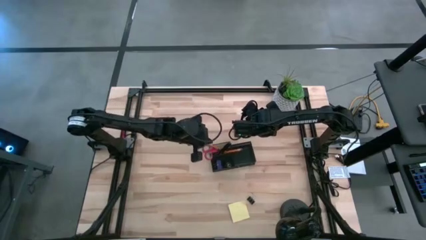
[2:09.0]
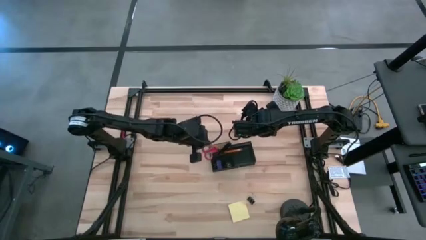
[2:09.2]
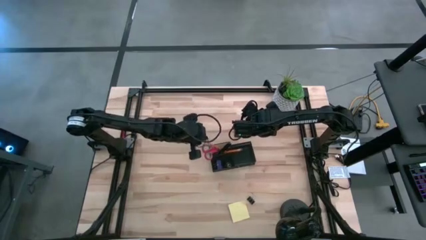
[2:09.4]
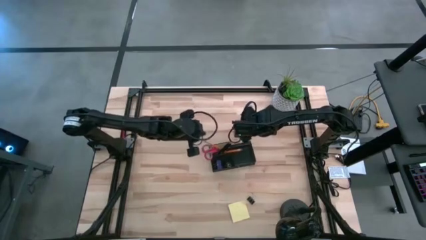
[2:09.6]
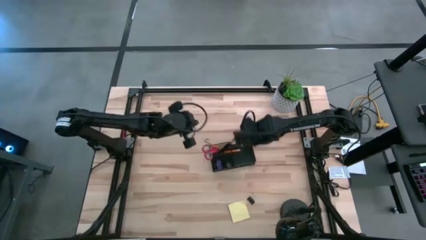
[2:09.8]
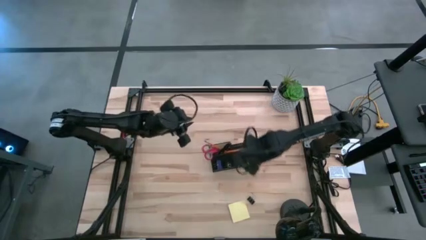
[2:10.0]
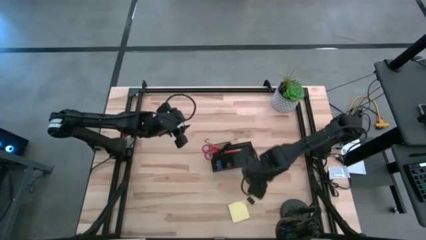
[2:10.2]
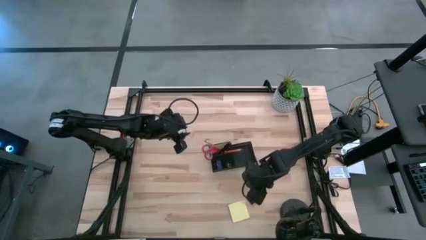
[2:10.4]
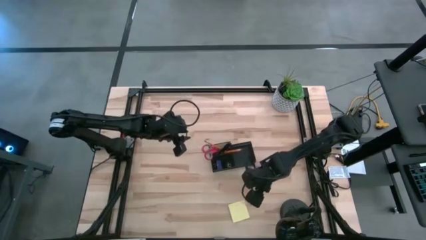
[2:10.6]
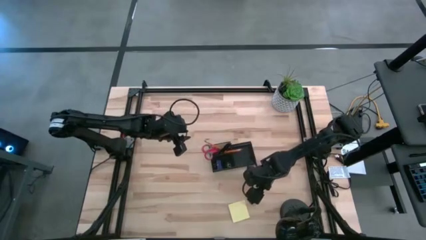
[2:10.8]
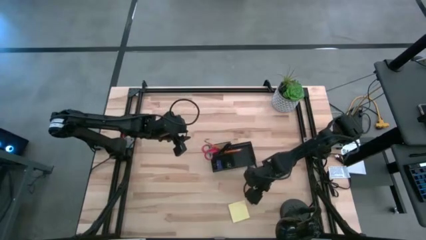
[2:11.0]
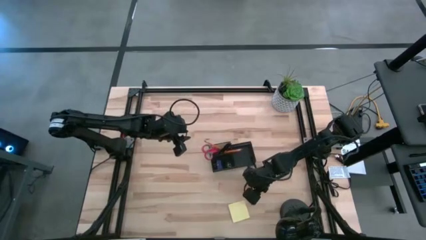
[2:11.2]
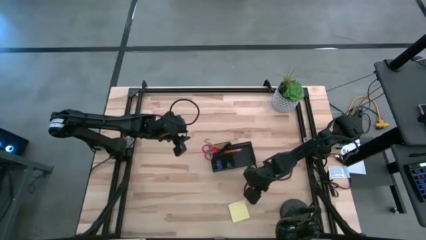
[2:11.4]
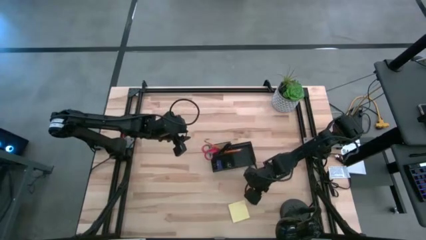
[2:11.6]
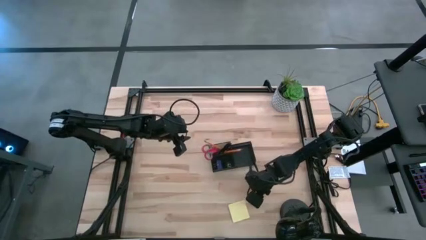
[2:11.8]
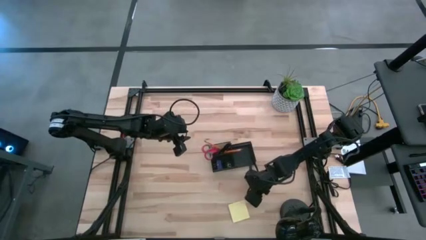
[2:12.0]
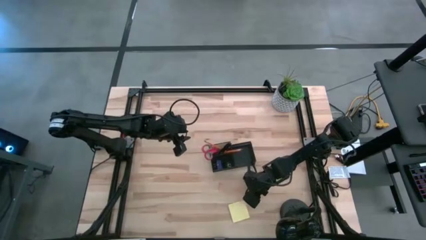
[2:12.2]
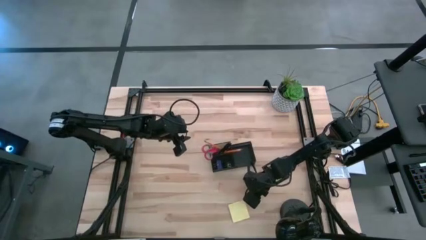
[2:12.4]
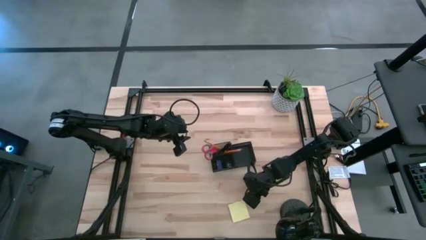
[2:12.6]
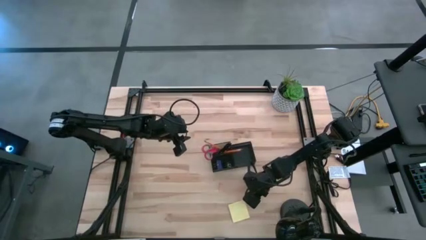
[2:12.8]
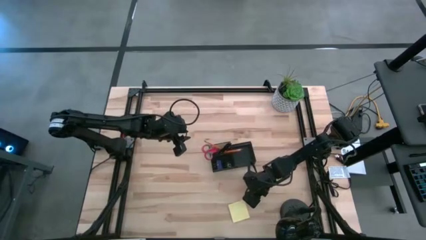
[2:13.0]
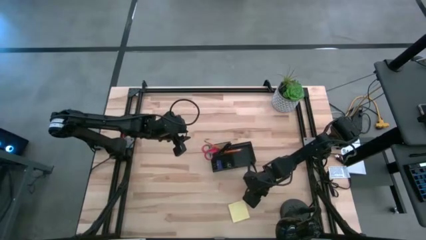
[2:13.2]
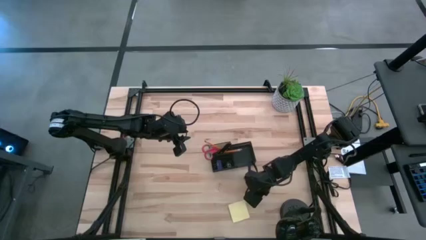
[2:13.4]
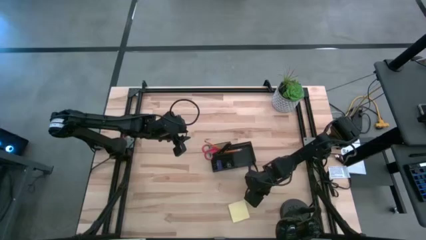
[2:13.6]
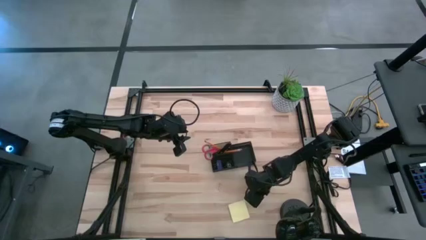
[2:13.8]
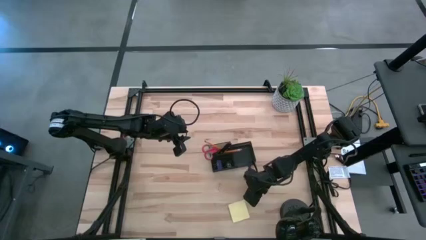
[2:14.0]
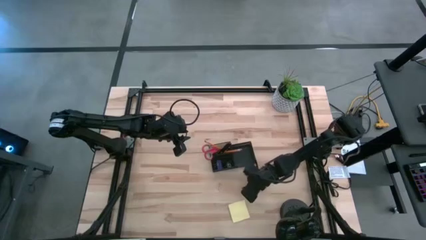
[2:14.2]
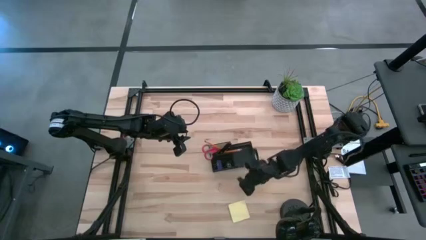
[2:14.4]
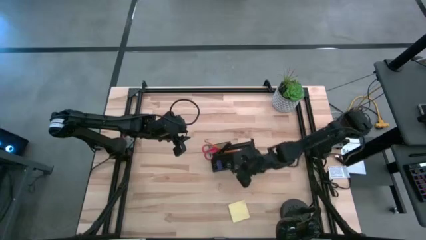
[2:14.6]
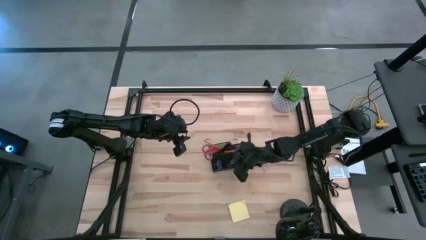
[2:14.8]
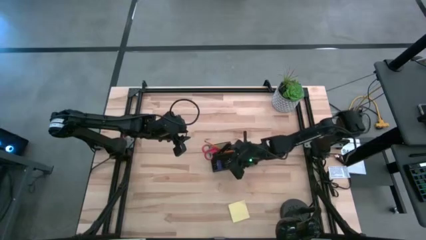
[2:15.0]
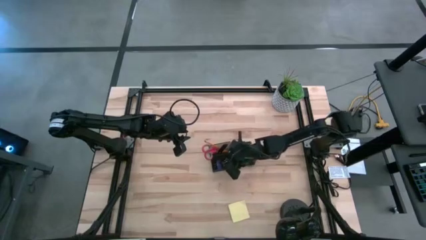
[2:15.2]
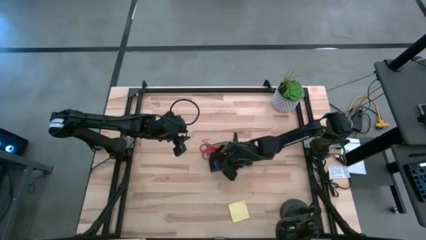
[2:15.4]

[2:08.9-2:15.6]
Task: Pick and place office supplies into organizer
Put the binder clip into the bottom left section of the desk organizer

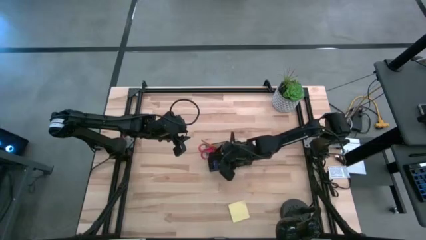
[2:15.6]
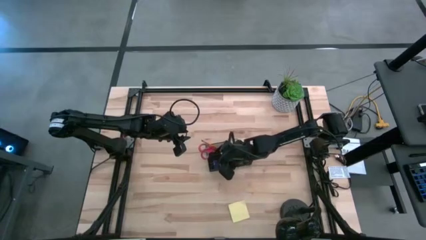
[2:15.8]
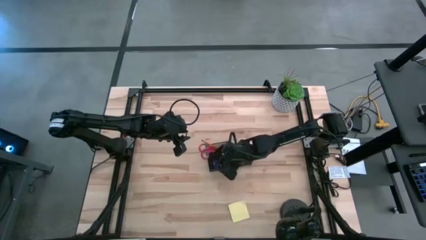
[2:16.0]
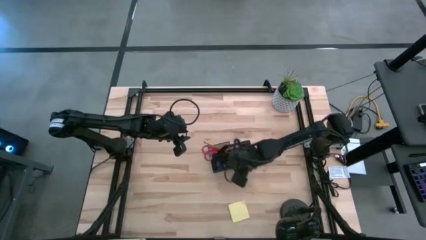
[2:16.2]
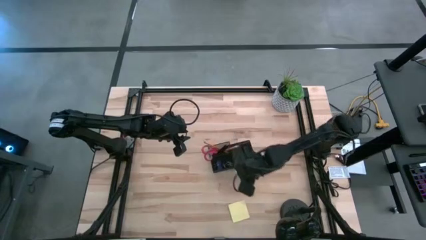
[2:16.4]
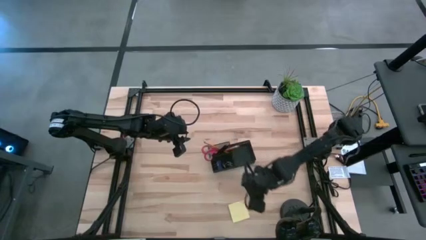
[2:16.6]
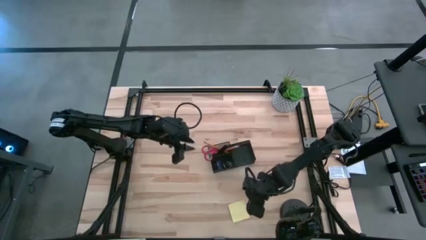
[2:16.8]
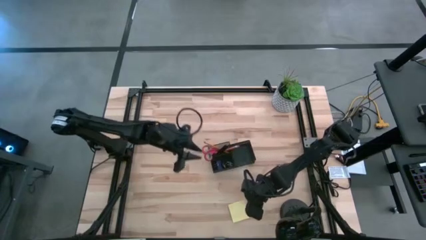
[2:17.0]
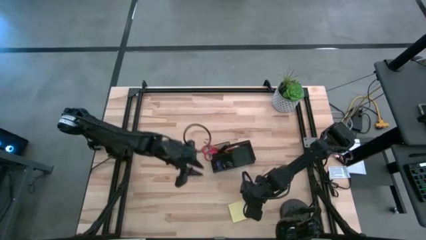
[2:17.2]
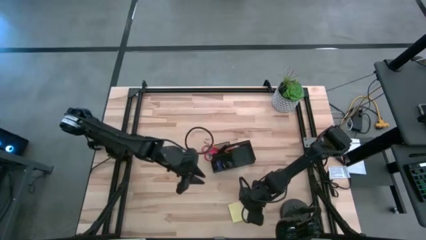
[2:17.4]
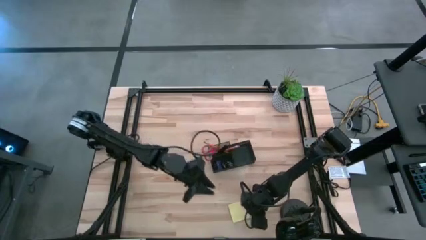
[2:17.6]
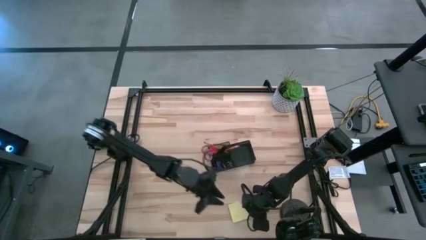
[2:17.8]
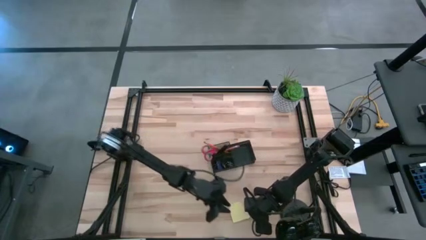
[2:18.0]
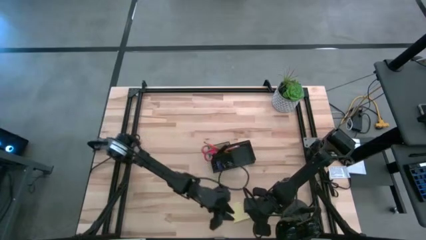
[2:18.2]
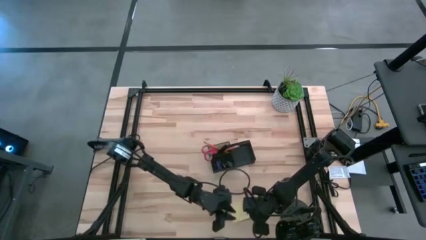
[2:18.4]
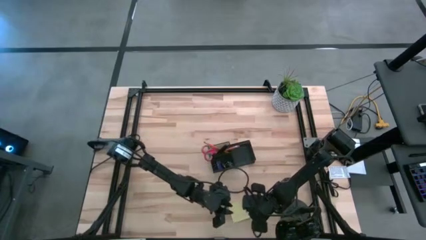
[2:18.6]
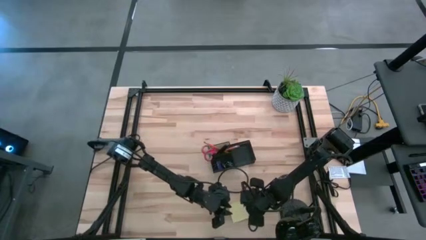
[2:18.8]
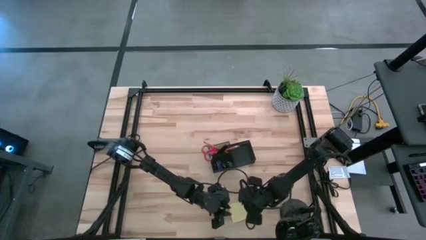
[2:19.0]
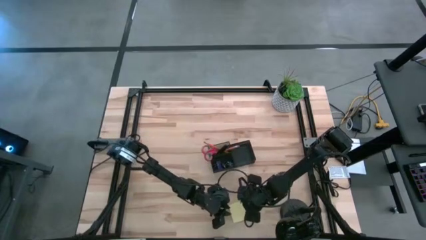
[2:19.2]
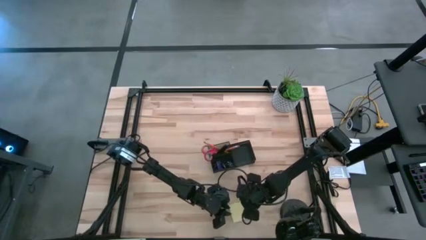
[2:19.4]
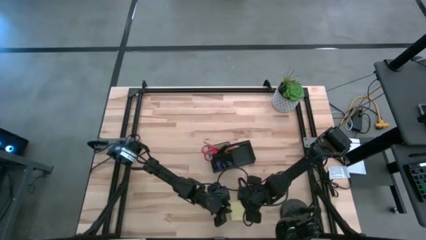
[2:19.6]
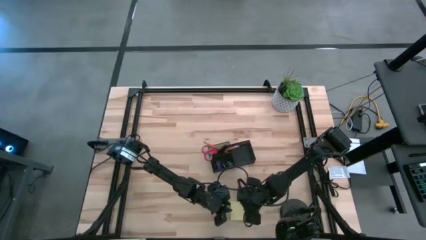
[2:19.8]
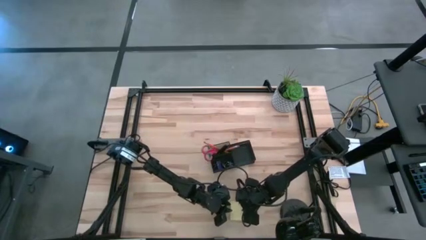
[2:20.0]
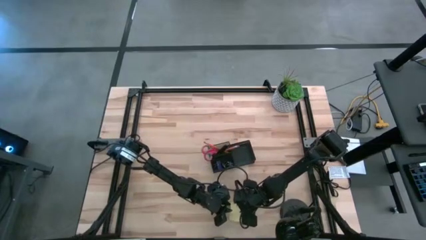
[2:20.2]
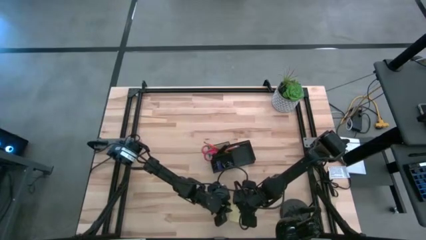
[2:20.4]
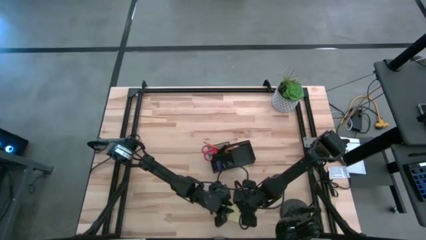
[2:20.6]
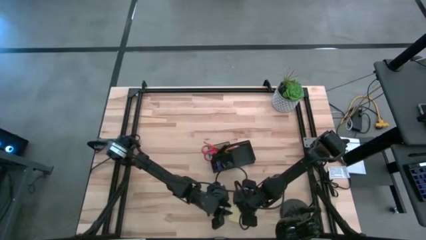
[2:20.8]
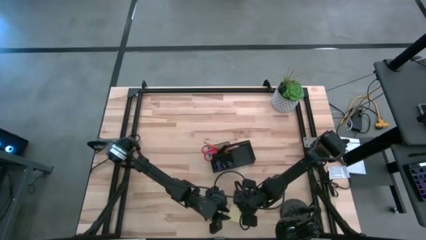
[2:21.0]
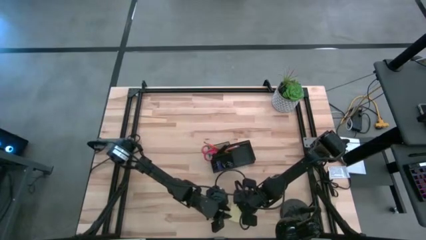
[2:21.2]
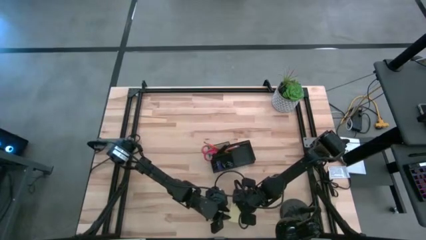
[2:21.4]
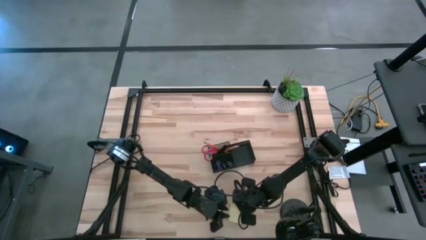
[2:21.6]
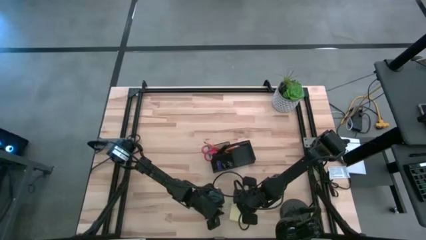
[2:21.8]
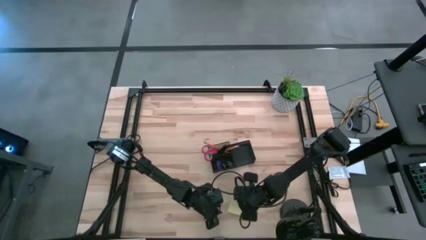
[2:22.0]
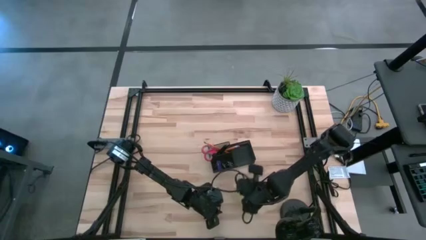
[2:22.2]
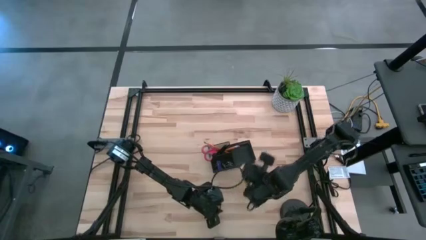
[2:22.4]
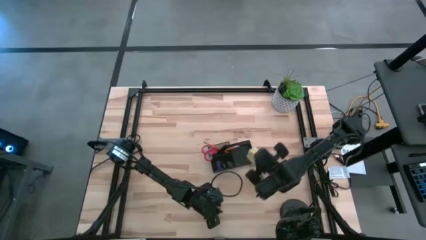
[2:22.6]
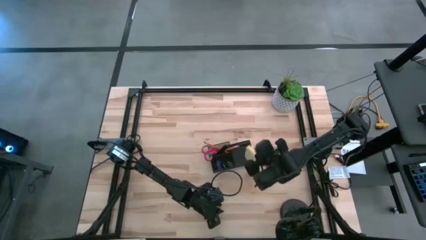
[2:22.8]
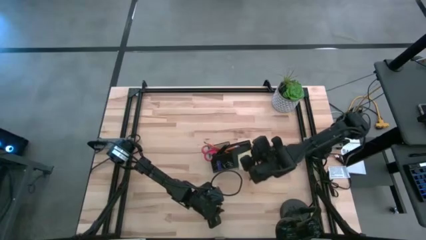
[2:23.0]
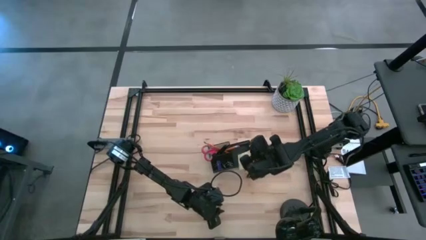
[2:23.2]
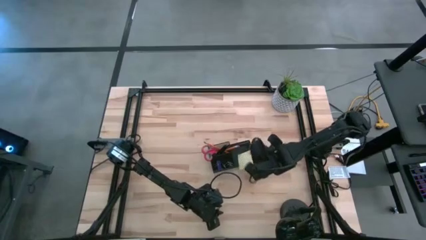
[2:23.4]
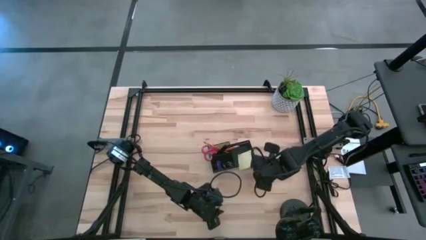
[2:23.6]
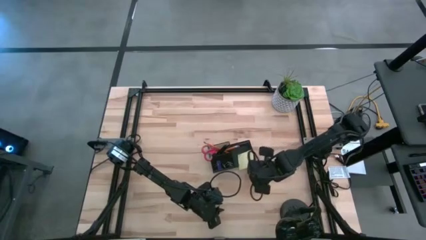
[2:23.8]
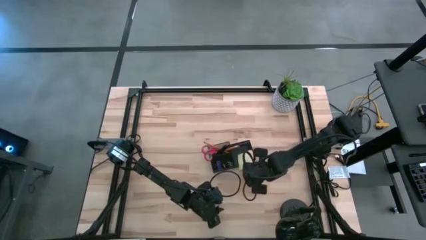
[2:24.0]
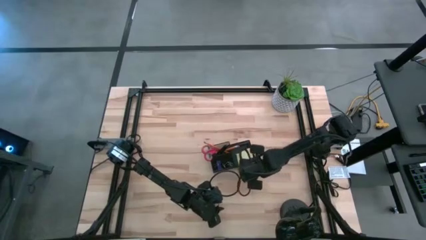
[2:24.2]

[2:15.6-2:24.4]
Put the sticky notes into the right section of the desk organizer

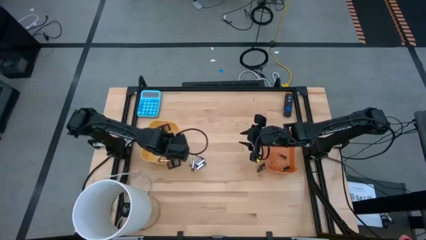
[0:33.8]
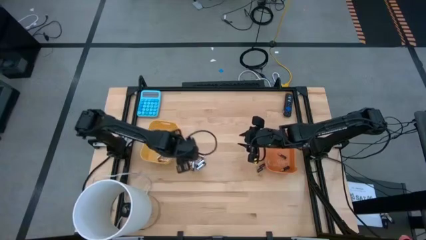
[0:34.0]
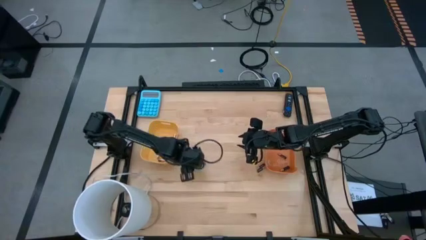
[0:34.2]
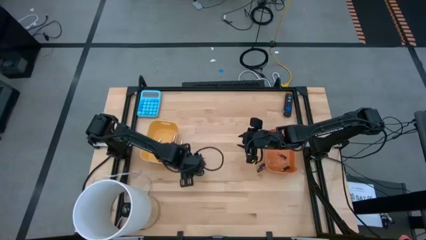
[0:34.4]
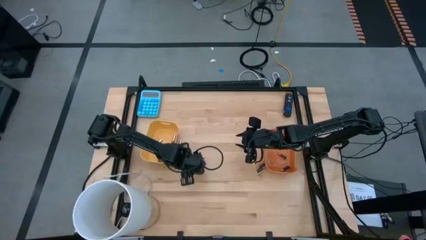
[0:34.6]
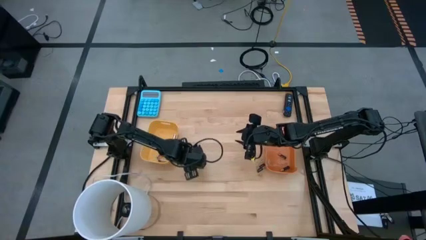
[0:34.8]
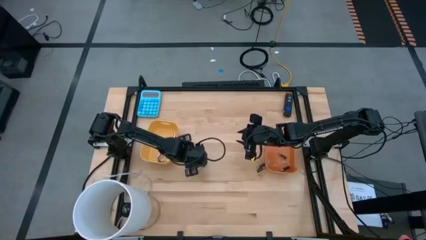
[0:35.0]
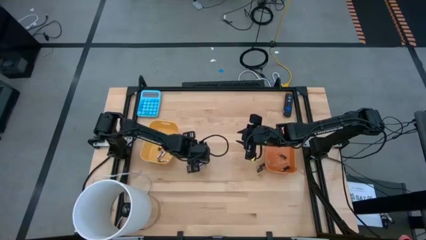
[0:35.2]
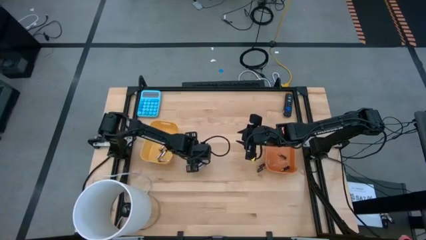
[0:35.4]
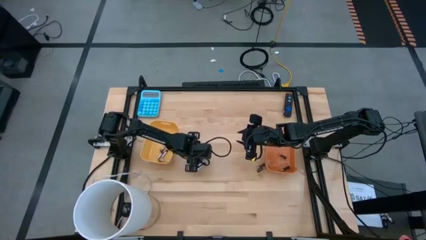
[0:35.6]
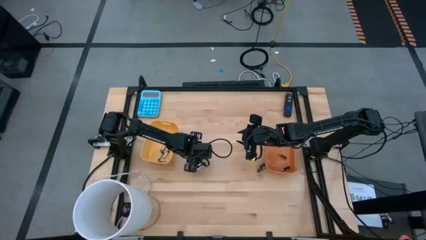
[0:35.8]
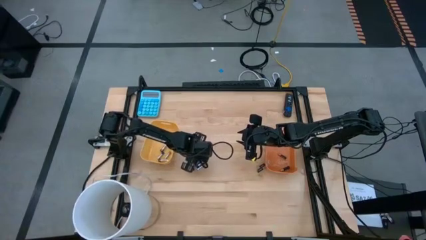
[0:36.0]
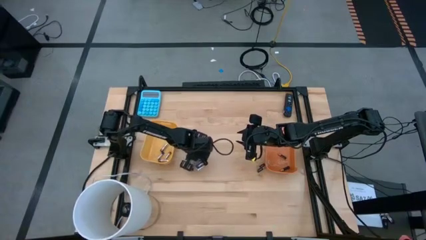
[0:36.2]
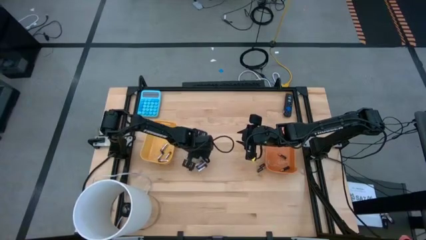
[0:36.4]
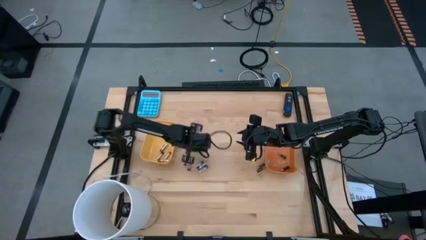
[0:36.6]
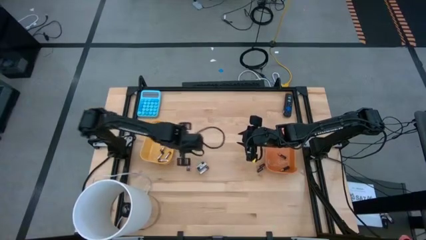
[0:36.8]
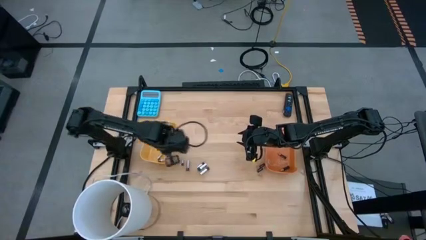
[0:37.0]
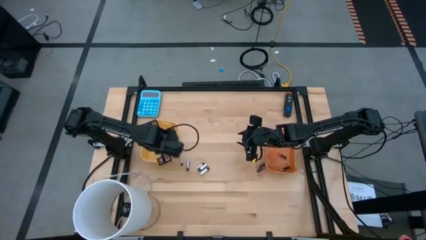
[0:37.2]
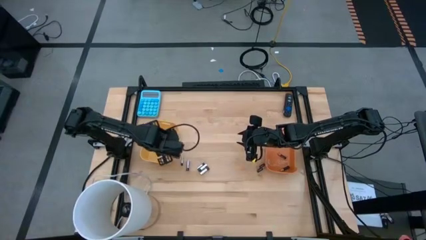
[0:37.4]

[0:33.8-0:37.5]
Task: Sort batteries
Put the silver battery into the yellow bin
